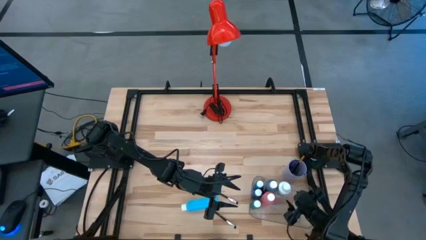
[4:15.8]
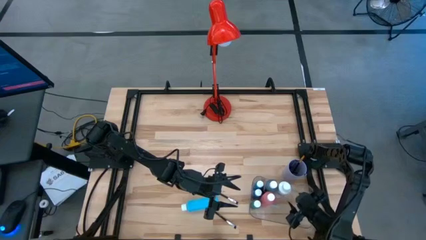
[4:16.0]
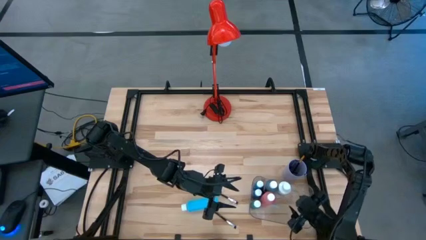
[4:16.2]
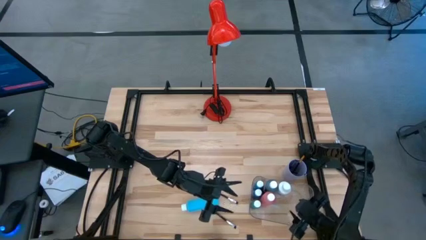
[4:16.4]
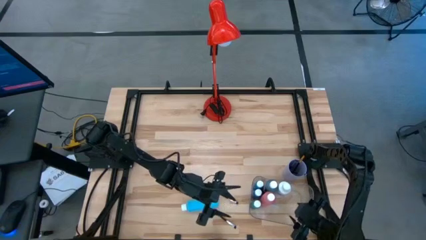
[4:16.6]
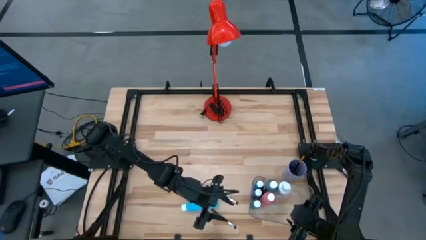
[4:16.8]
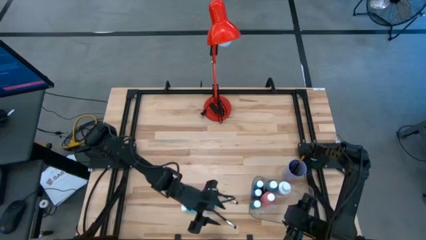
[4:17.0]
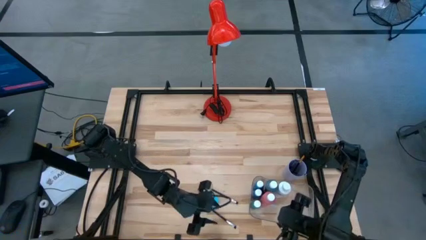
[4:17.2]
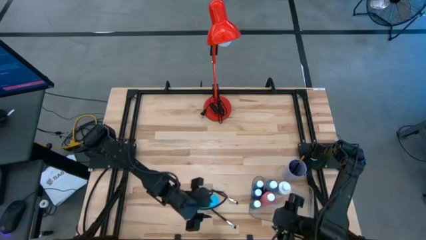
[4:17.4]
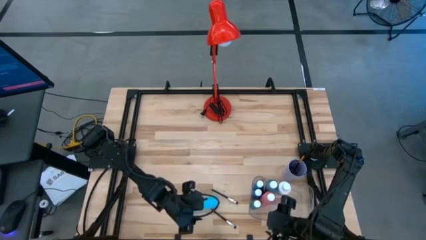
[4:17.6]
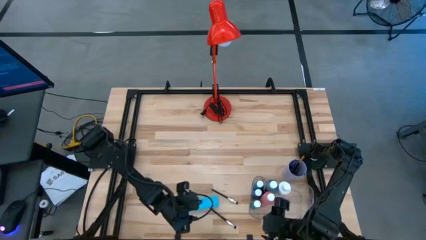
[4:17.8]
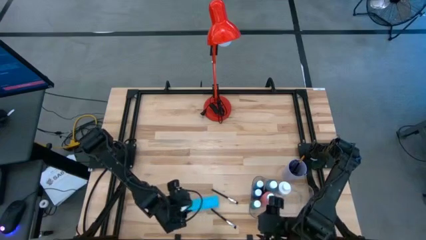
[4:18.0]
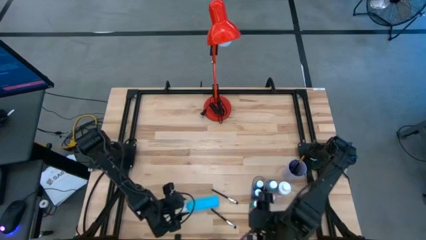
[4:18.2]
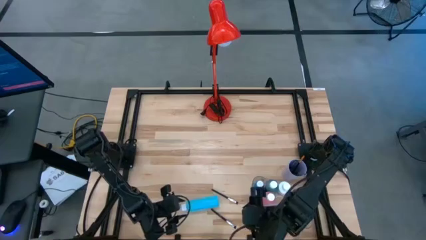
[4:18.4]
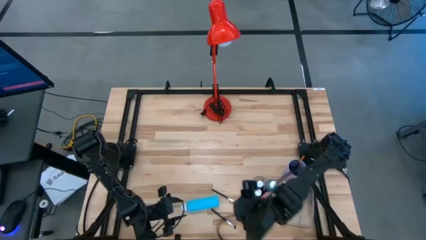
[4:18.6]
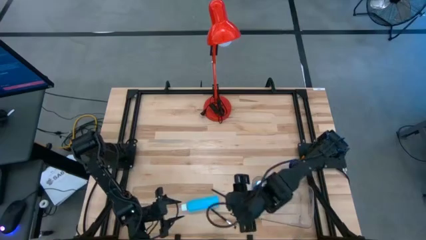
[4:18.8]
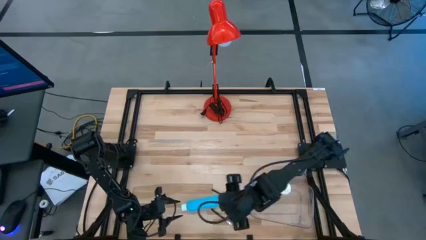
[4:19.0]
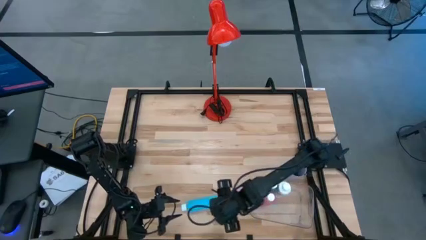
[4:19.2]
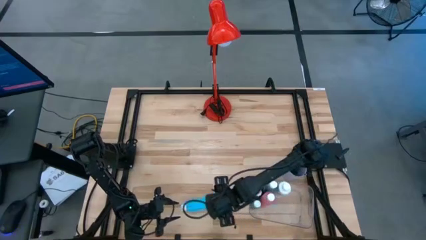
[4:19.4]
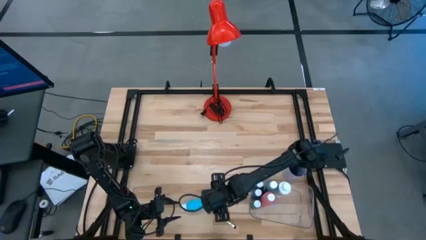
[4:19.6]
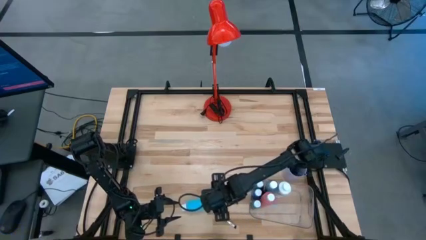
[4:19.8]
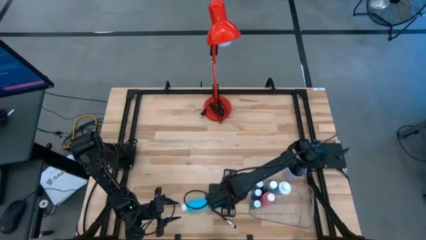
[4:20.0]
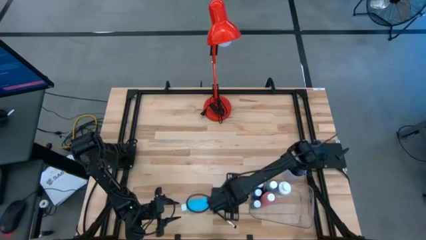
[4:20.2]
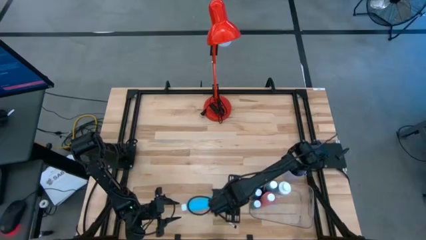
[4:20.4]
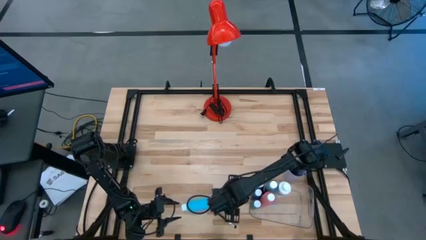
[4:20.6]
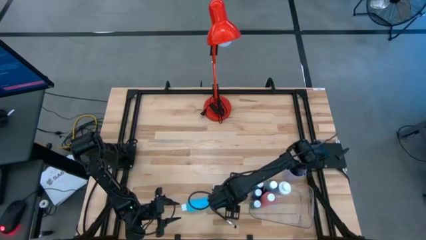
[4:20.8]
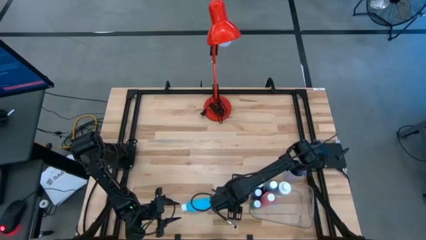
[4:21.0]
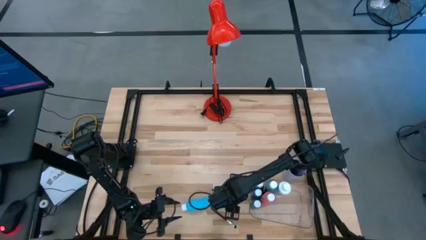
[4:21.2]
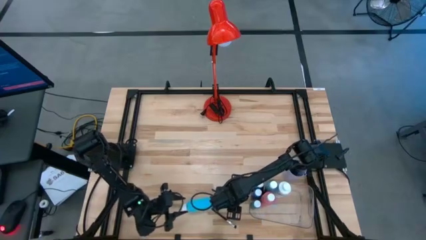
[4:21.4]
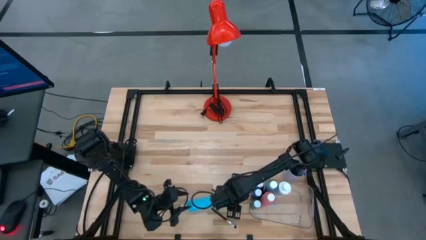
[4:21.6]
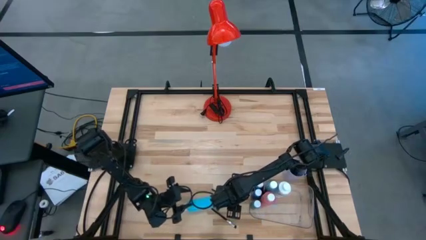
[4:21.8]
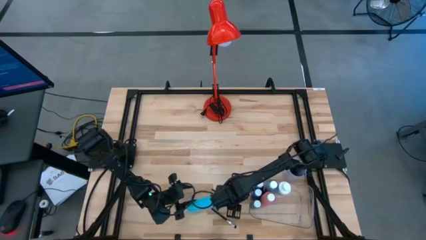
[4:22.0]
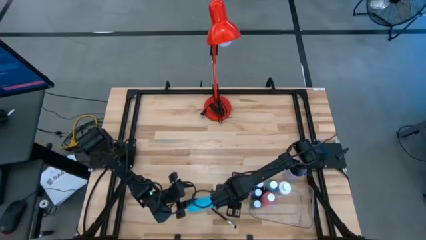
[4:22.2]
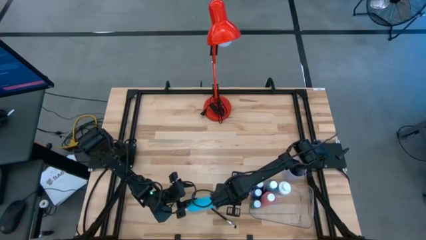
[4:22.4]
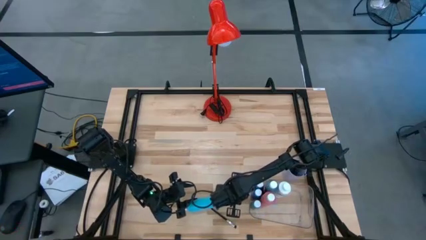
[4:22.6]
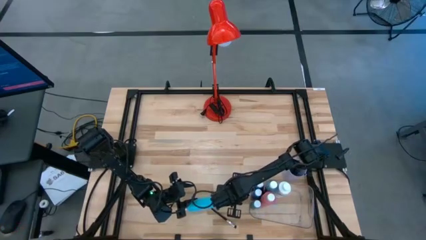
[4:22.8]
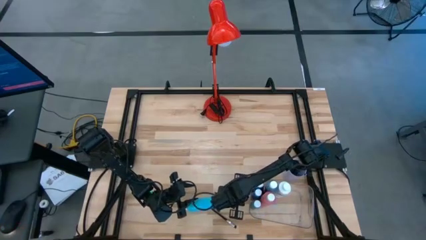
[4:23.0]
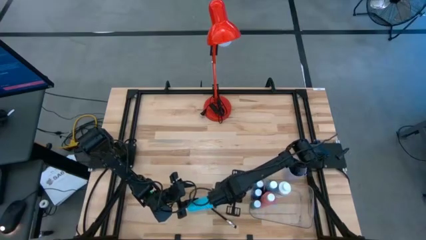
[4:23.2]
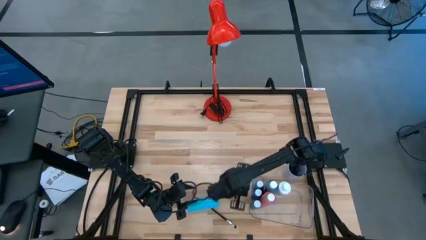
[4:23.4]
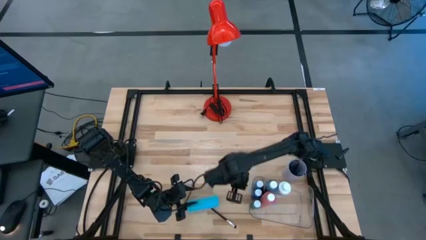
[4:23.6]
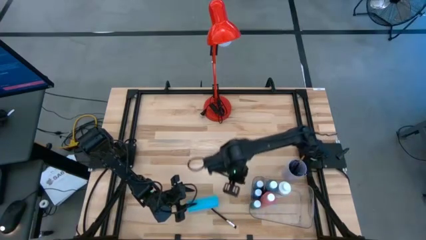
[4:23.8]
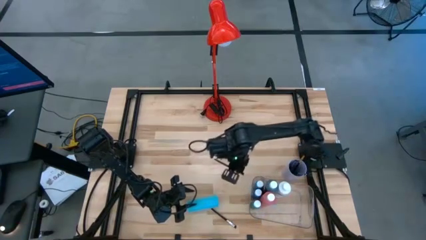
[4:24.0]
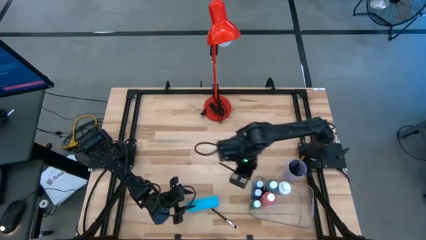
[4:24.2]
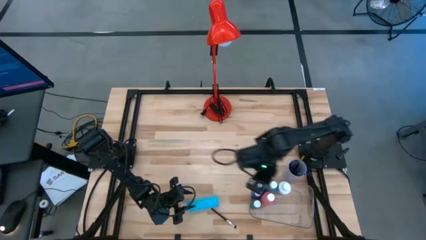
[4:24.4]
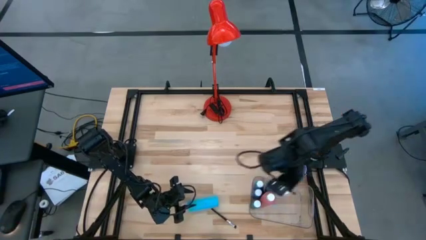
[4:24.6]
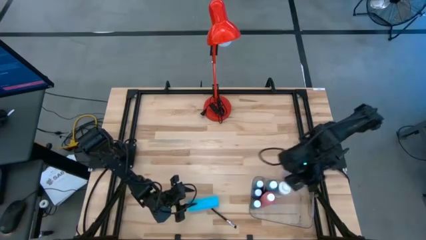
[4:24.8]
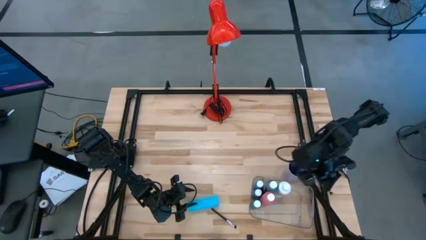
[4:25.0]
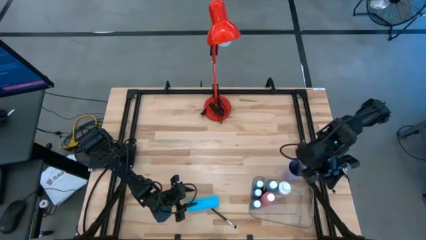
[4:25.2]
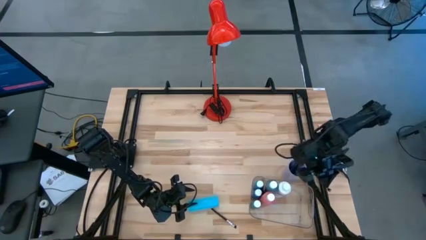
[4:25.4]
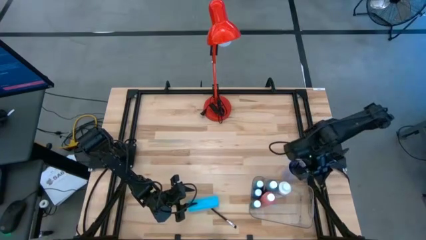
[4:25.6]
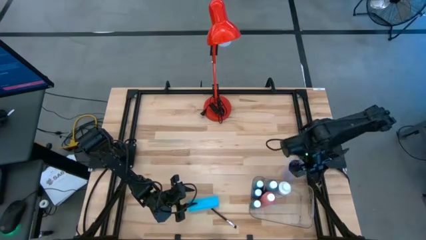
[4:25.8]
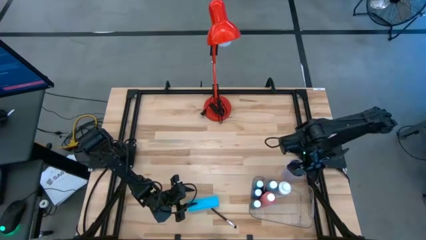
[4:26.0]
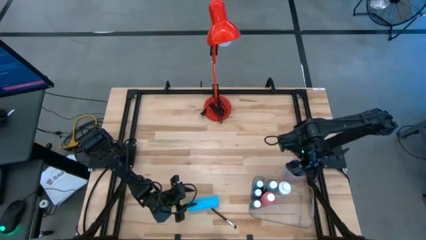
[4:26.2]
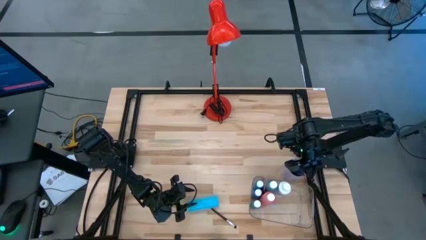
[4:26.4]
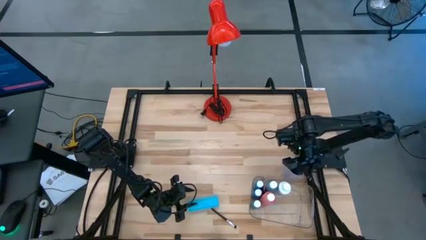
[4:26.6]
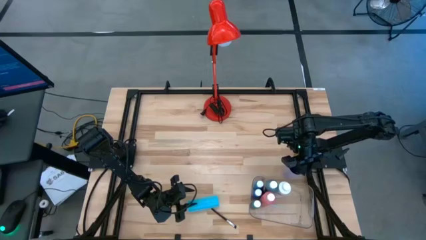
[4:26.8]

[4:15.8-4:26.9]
Task: Pick & Place Paint Supplies
Put the black silver paint brush into the purple cup

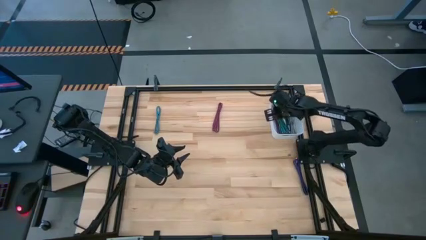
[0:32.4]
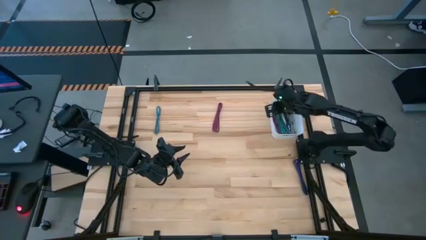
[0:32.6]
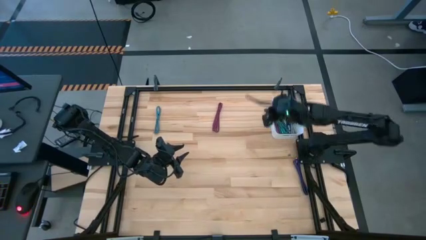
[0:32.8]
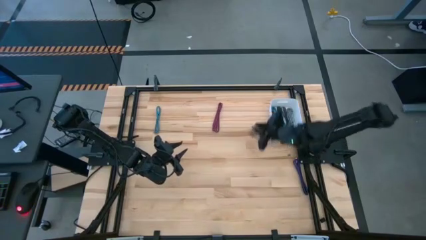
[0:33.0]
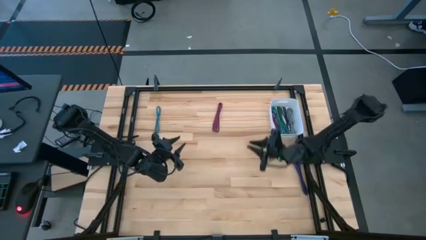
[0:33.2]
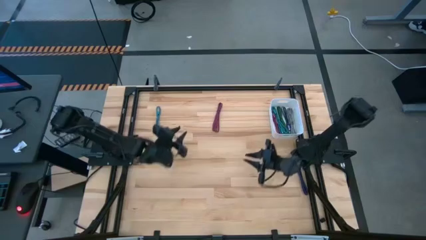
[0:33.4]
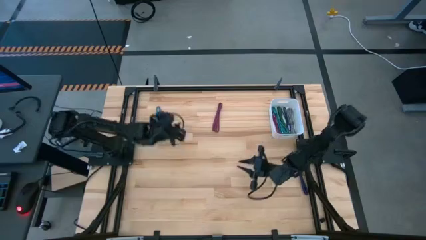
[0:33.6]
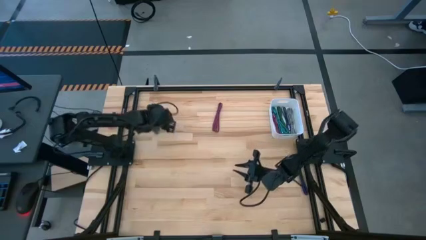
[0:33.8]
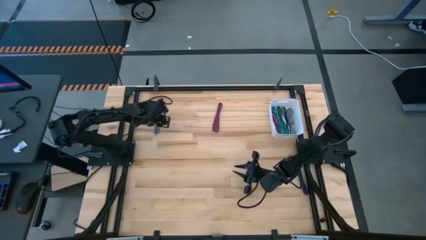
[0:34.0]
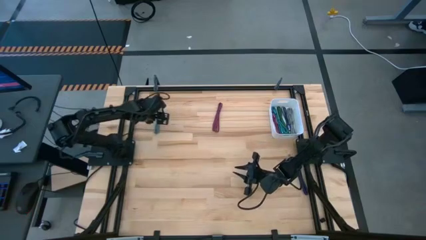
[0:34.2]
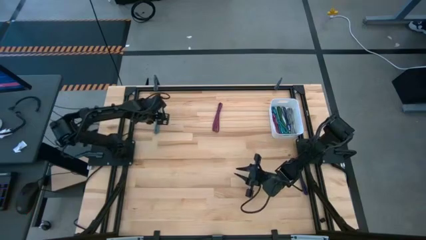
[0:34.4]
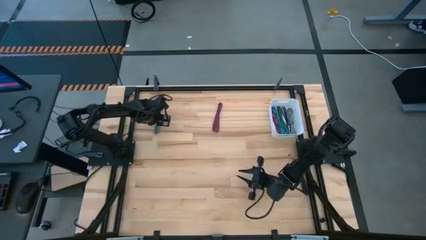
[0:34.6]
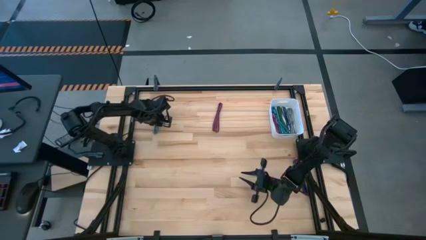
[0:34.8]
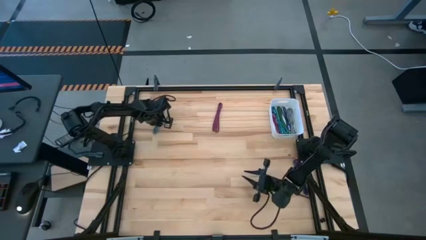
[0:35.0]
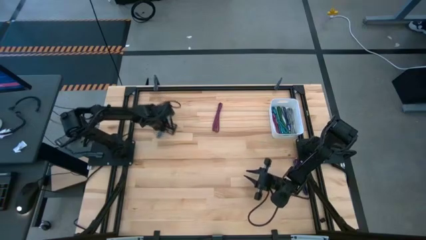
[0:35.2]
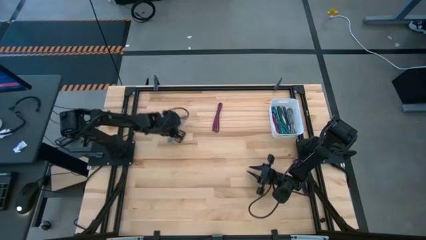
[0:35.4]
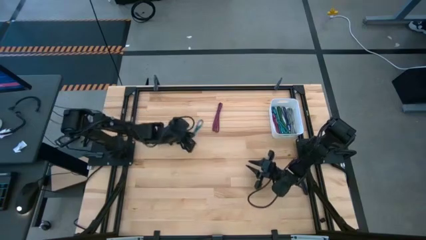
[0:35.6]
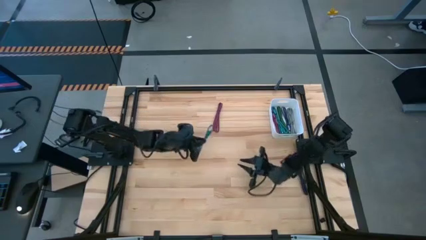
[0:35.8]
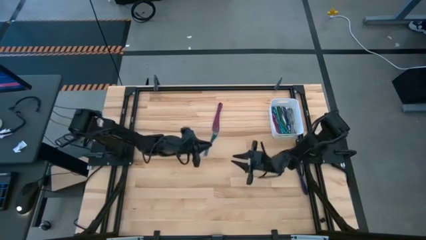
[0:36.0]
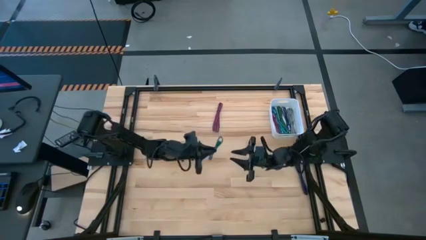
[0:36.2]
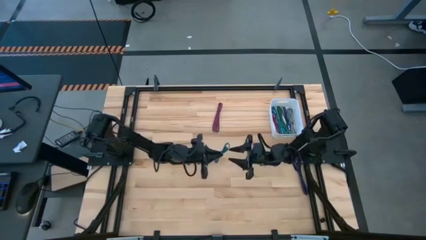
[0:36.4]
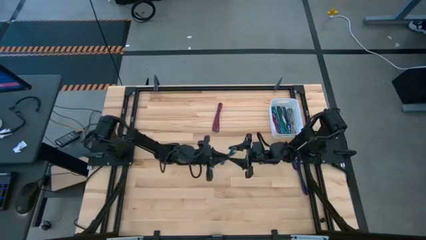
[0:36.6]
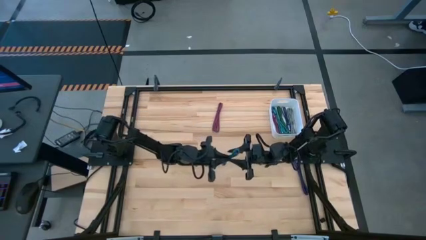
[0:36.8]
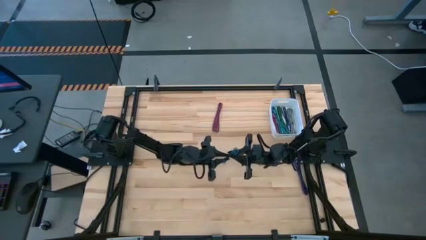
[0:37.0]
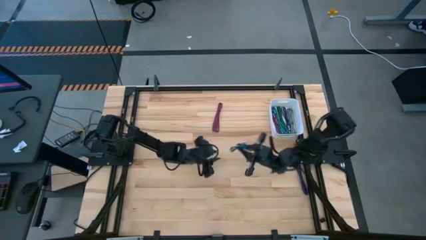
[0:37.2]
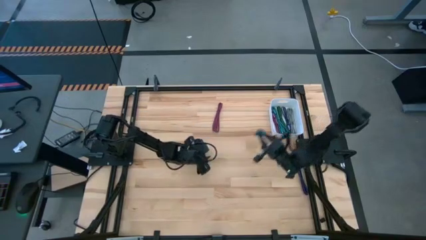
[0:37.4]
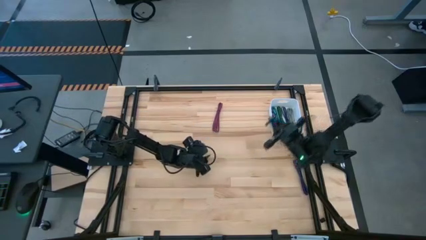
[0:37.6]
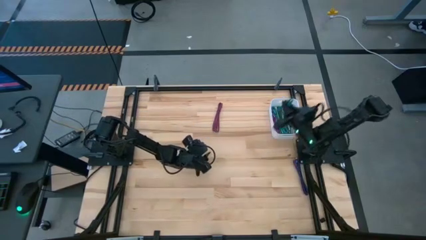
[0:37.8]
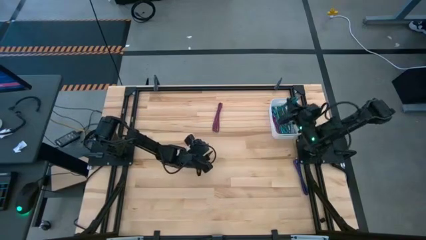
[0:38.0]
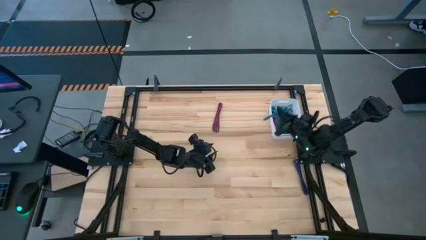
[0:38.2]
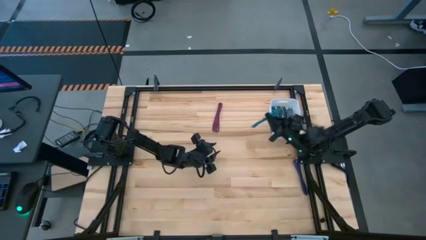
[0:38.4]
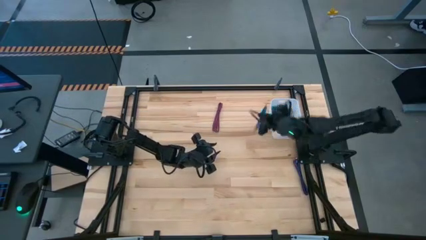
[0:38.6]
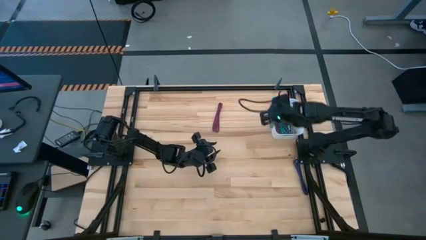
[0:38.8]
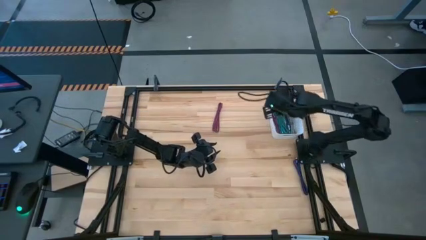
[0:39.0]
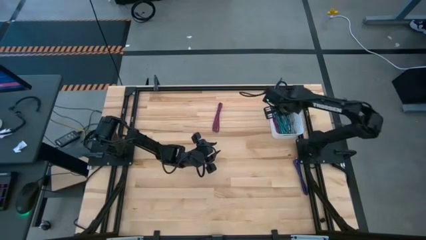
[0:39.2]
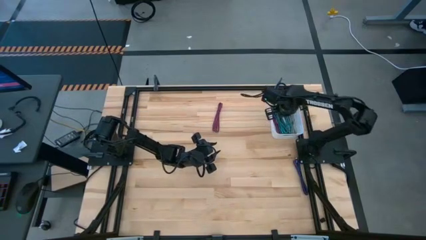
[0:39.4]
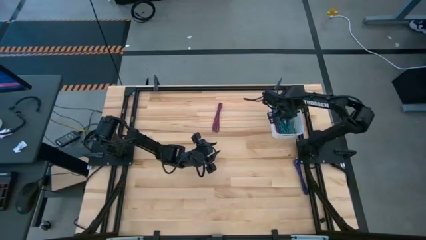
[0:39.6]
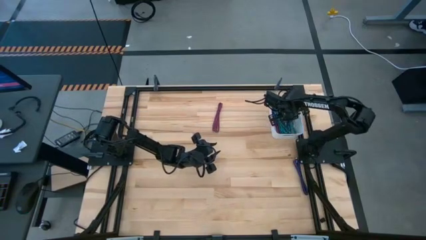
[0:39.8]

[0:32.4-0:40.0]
Task: Pick and place USB-C Cables
Put the blue charger cable into the white bin
